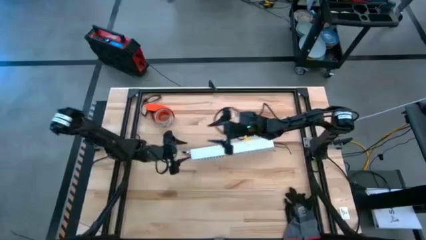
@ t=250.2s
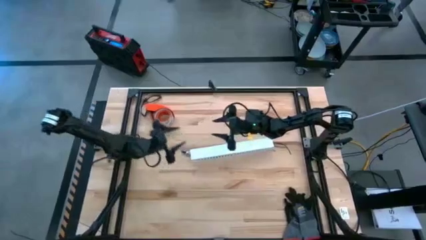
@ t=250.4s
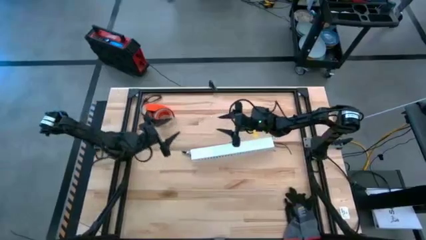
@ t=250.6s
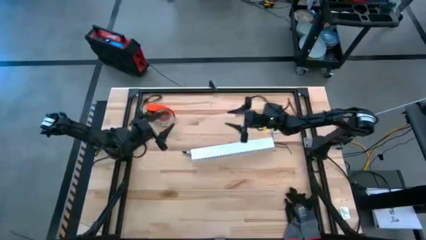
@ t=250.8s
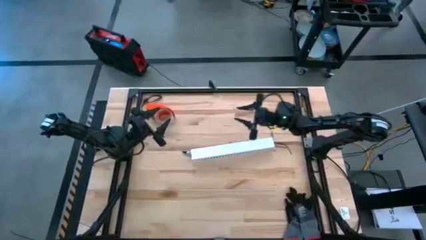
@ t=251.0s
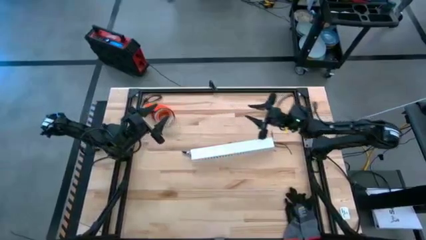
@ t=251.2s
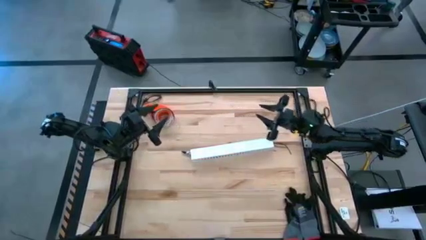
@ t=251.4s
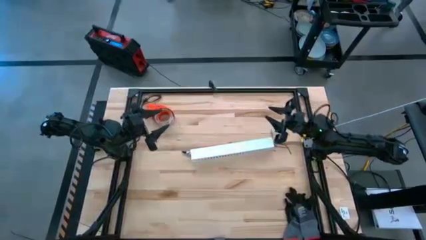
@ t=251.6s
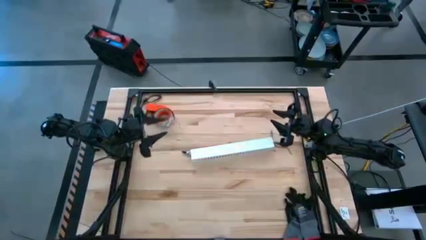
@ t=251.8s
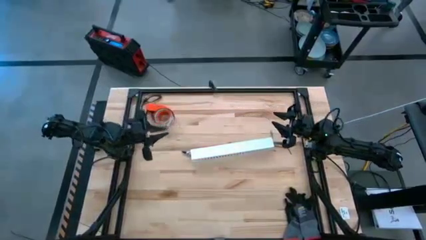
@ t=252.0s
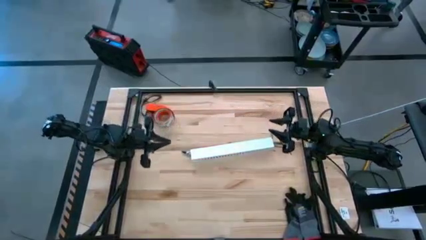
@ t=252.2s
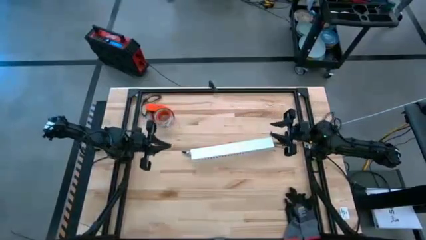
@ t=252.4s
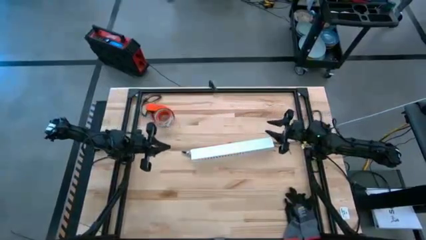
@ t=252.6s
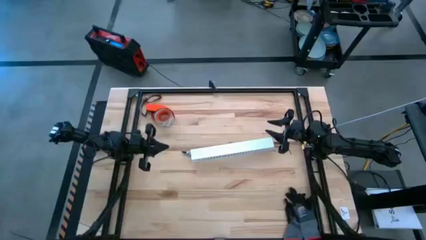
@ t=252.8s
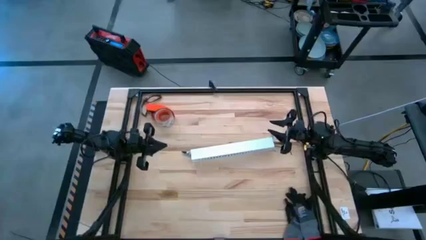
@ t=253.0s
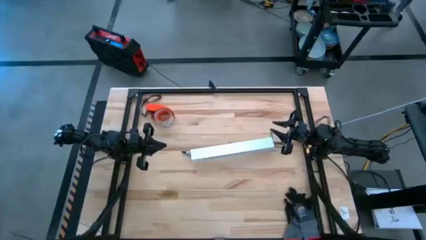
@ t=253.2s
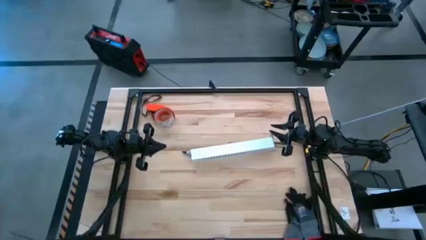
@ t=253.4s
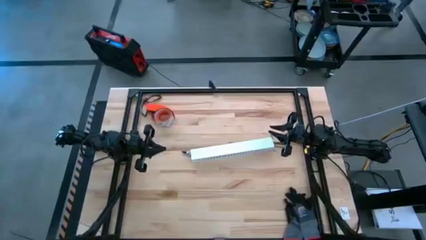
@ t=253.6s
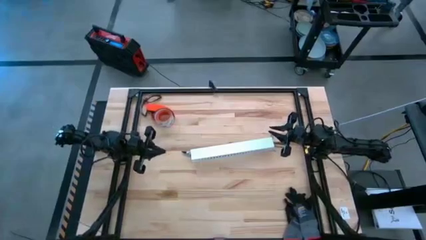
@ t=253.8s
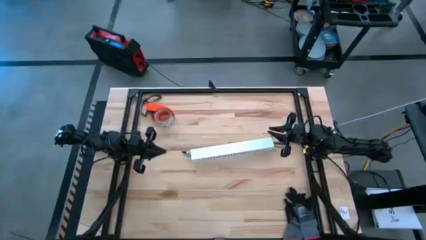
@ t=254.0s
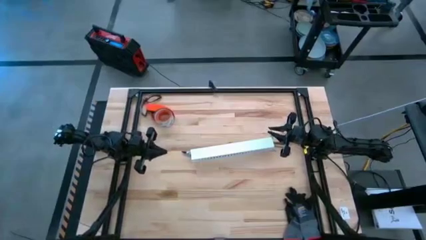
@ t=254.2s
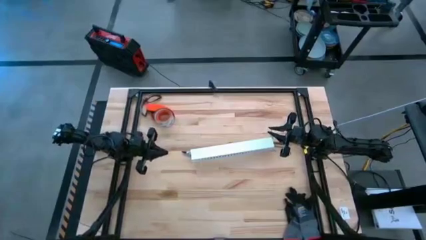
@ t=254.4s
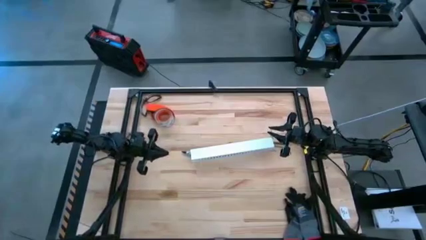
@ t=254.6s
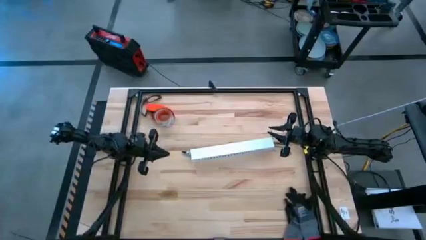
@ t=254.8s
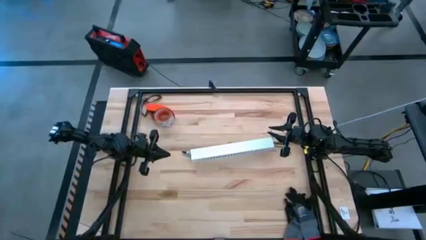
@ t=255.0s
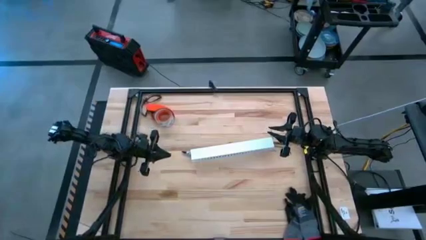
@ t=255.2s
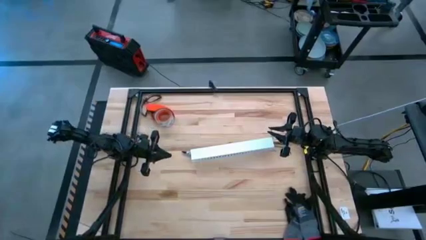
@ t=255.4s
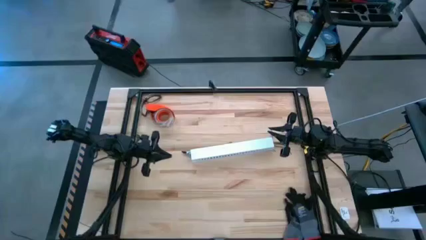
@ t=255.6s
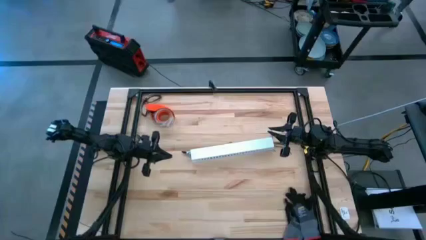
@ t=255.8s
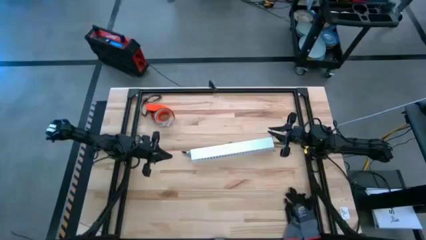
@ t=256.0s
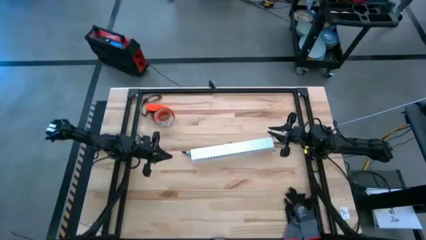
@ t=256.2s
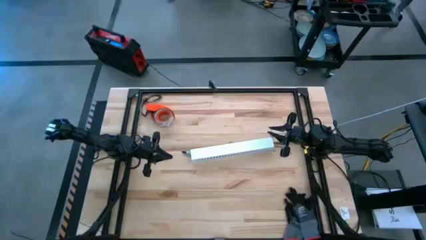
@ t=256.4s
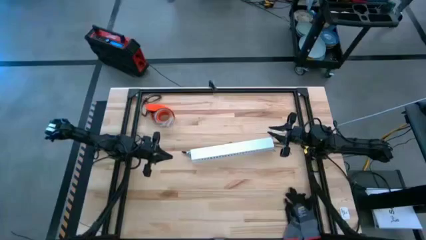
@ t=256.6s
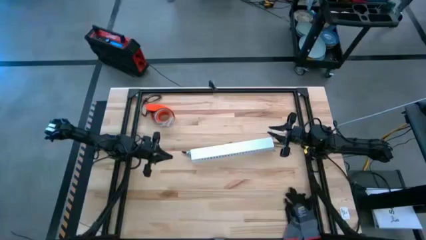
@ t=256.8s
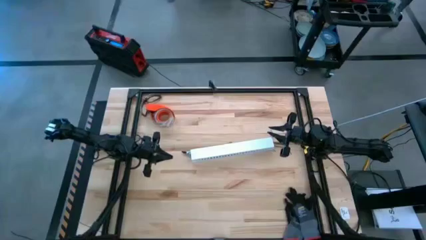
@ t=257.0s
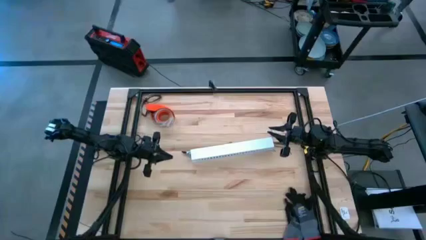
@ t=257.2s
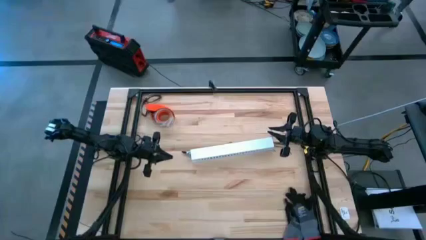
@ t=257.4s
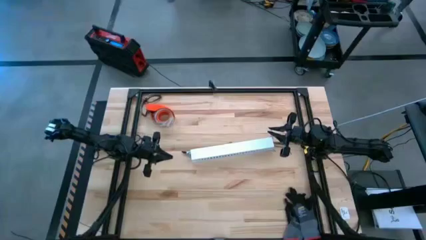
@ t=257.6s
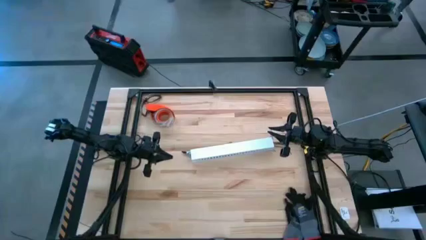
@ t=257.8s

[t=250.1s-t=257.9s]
Task: Ziptie cables
Return to Home Position
